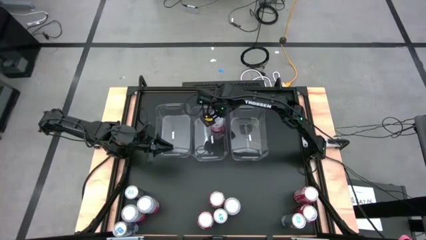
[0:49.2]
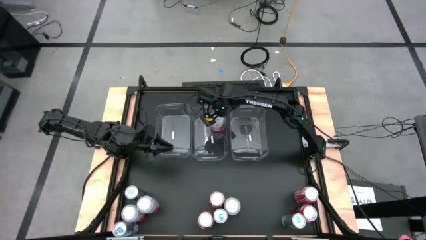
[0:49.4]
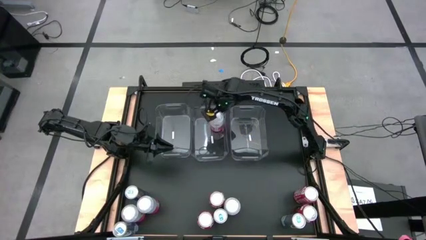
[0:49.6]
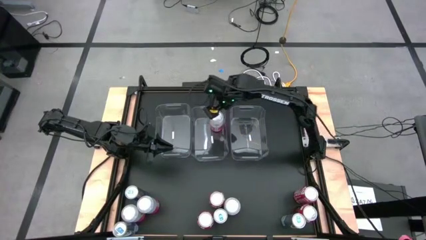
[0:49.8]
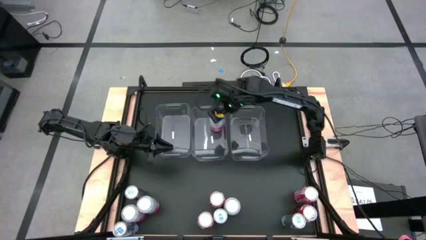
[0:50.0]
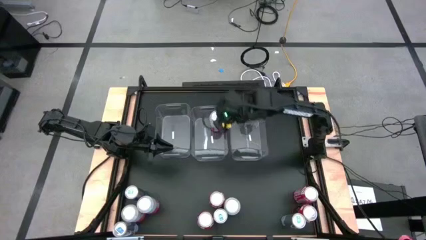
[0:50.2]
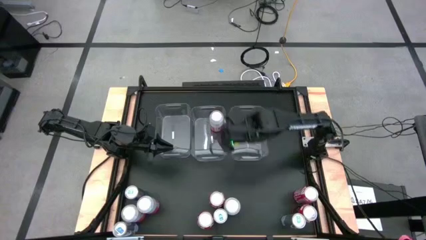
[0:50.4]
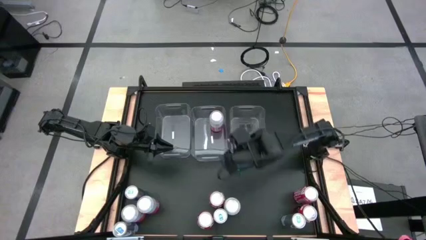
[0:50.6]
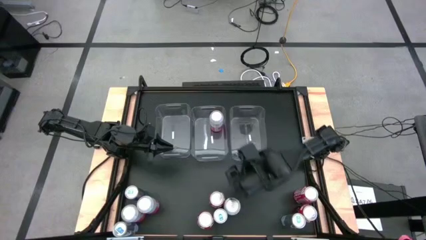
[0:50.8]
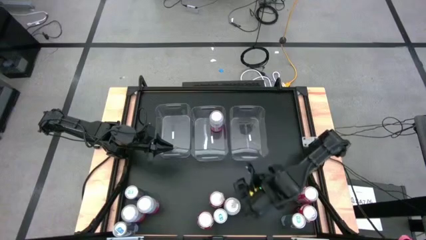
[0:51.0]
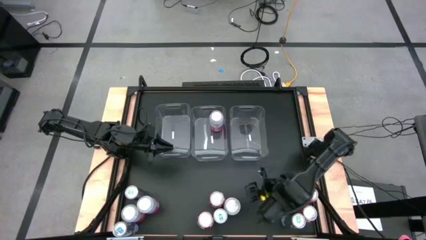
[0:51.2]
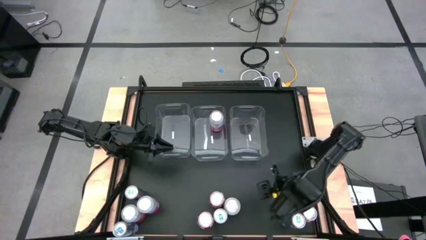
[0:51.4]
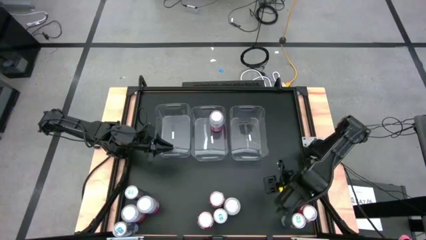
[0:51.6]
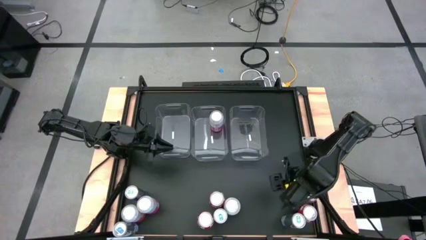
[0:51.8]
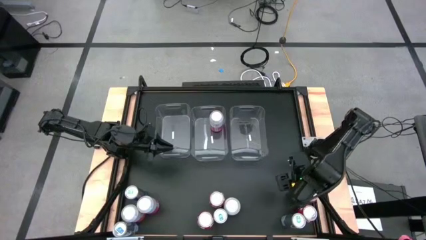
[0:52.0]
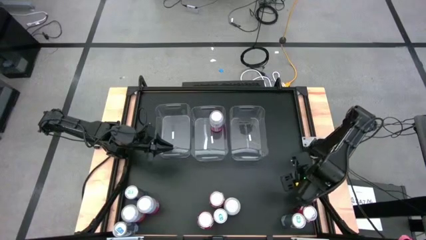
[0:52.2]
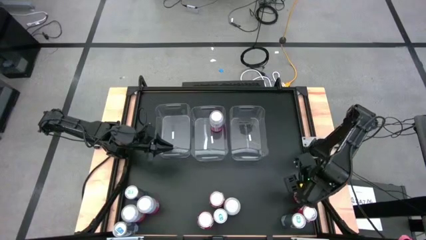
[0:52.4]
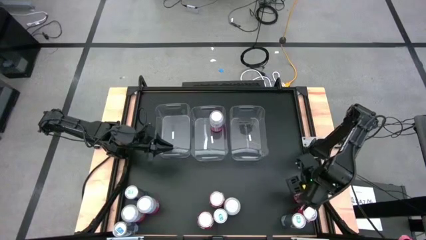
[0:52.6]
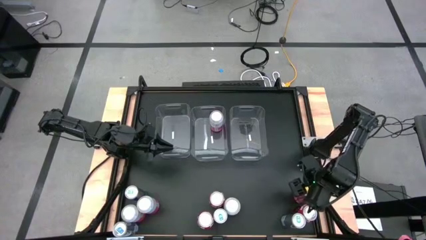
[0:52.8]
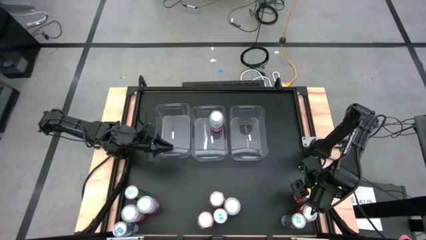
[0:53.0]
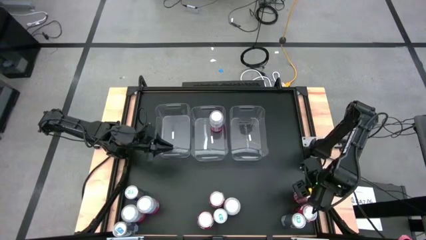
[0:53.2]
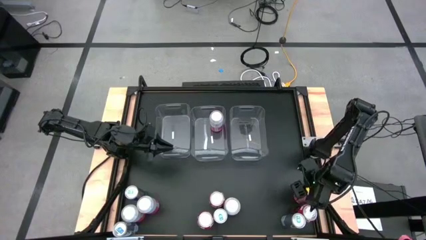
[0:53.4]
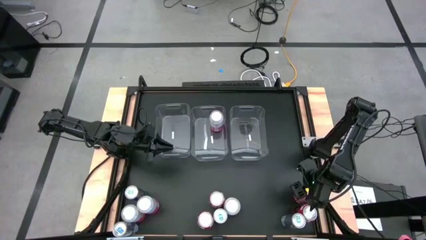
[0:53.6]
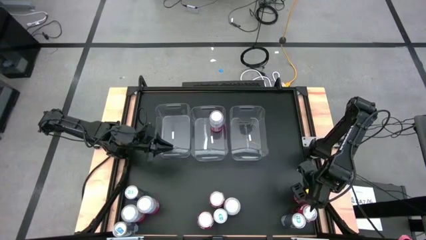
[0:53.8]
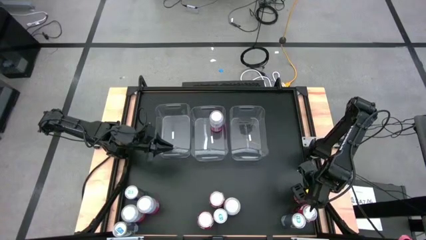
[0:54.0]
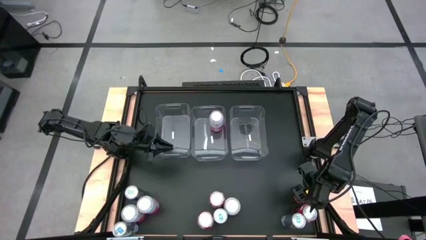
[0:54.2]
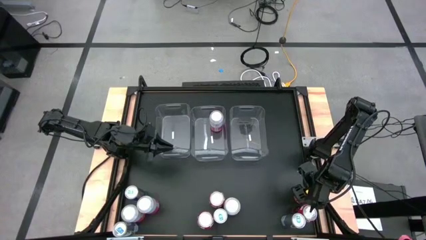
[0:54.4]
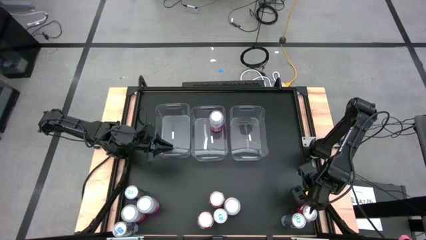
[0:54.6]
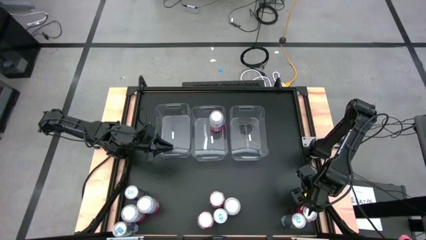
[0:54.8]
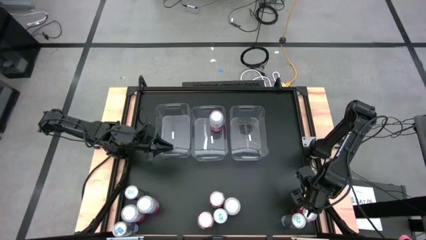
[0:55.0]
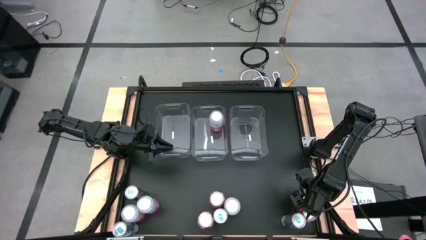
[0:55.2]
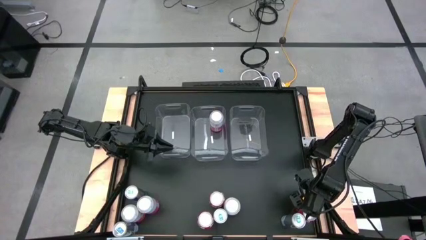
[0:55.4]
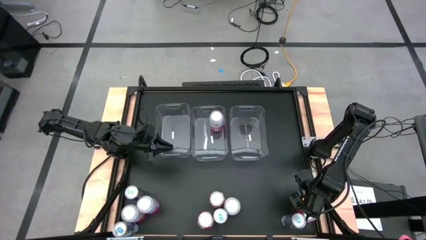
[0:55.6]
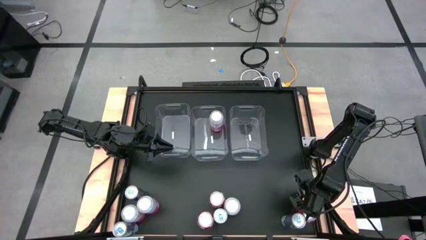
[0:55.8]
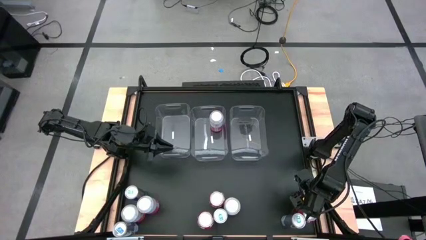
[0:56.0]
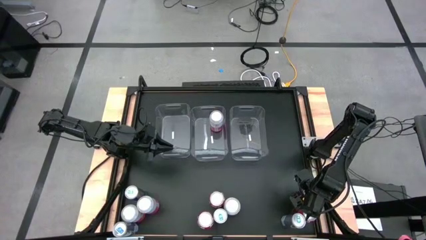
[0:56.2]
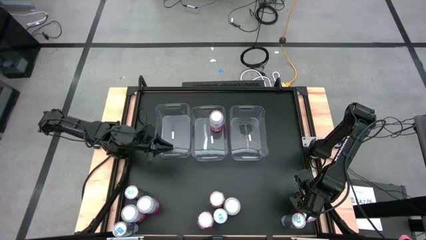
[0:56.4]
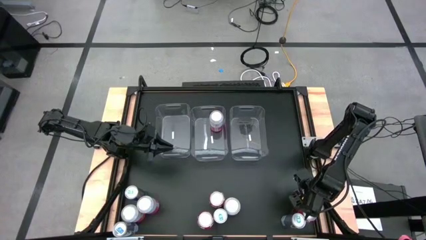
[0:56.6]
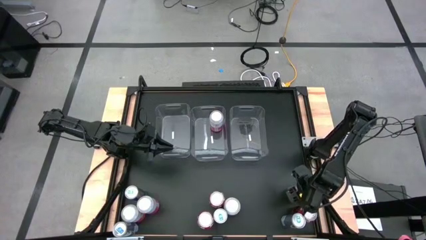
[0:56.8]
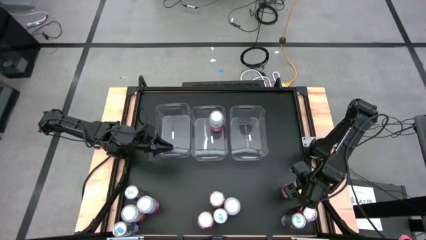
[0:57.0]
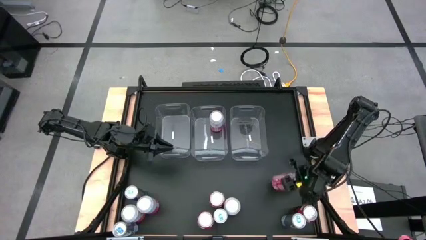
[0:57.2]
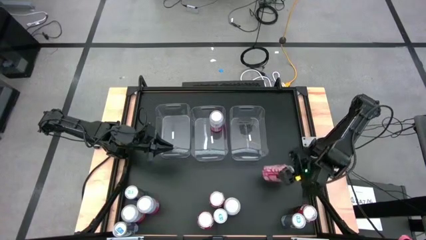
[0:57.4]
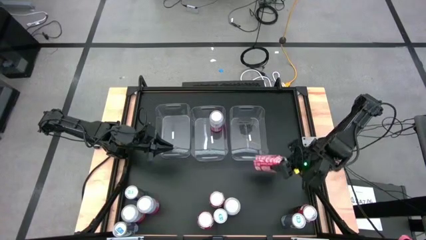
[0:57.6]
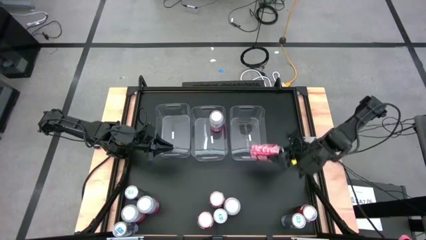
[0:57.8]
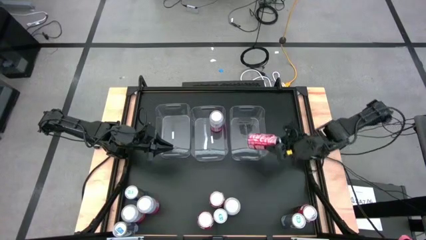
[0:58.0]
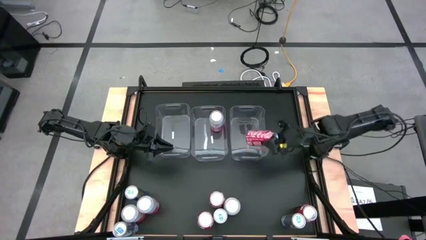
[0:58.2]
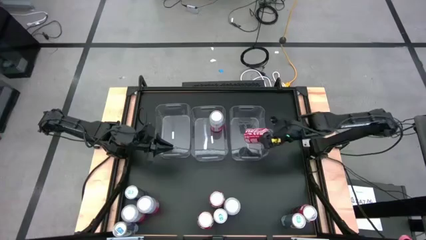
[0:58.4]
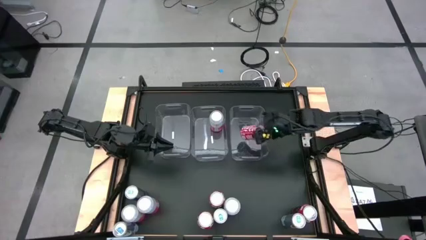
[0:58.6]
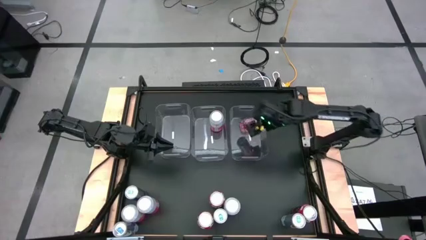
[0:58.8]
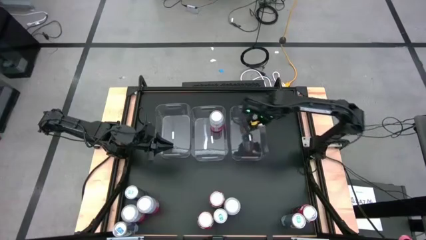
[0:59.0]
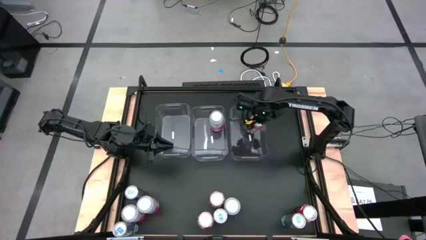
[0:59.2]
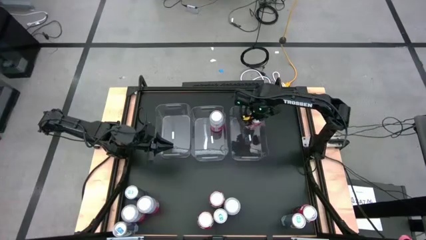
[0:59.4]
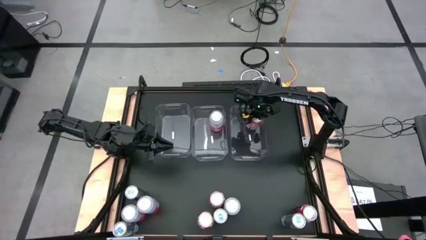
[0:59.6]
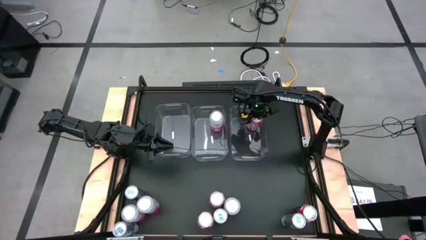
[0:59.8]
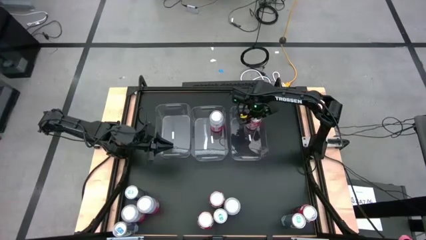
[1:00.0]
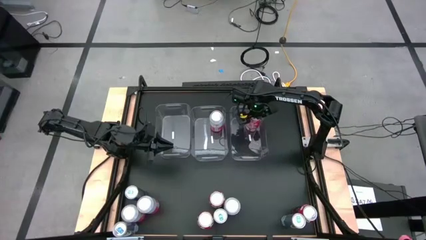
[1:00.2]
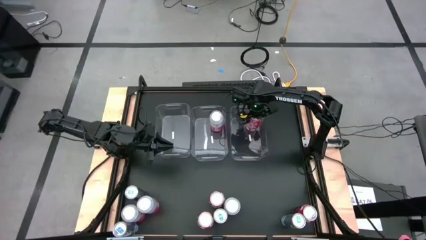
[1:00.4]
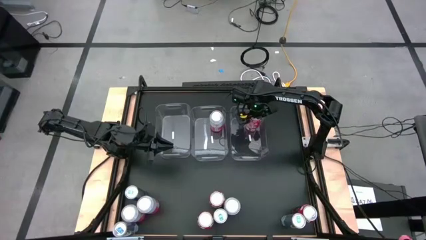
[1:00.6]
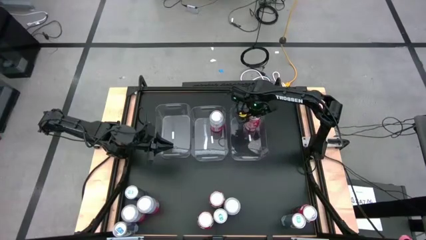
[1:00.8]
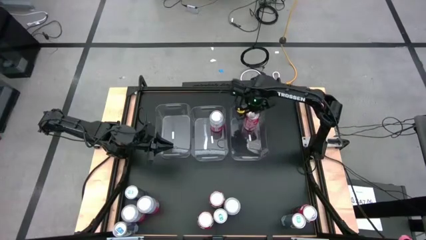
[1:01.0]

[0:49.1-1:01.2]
Task: Sort soda cans
Put the red-white soda can into the right transparent bin

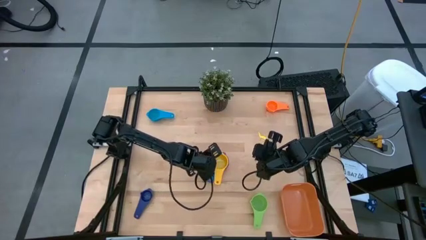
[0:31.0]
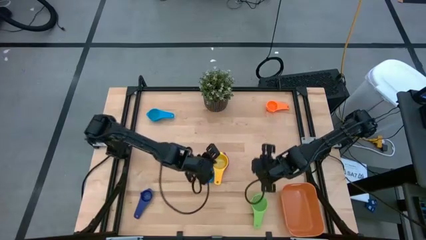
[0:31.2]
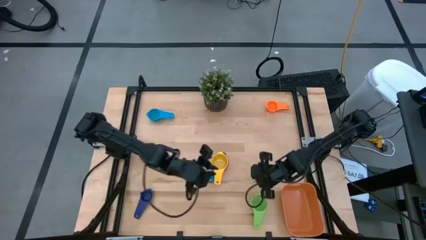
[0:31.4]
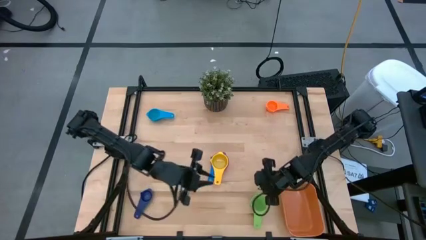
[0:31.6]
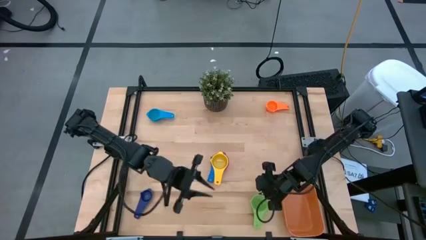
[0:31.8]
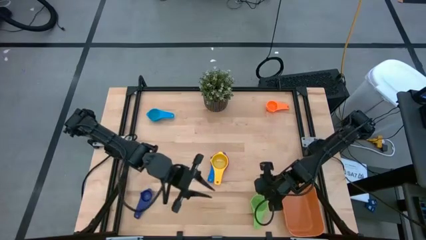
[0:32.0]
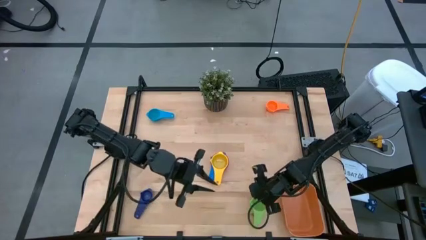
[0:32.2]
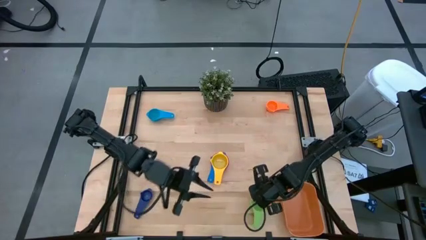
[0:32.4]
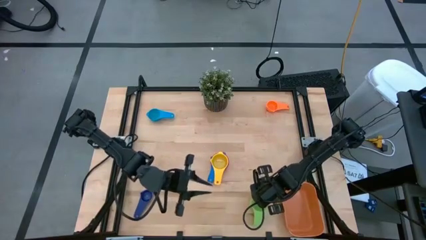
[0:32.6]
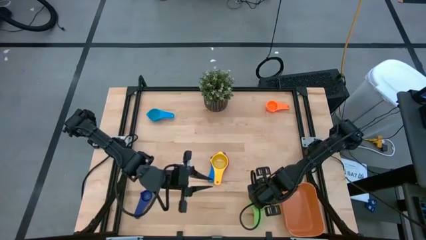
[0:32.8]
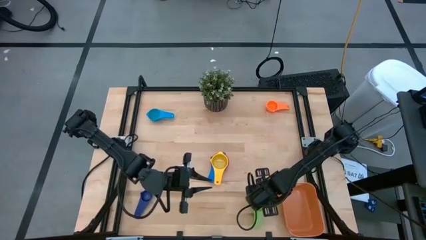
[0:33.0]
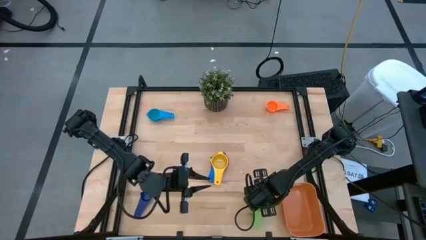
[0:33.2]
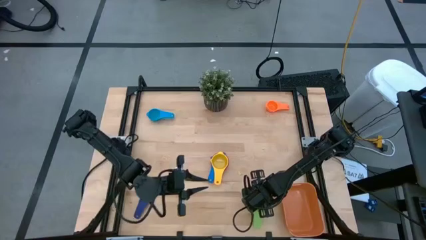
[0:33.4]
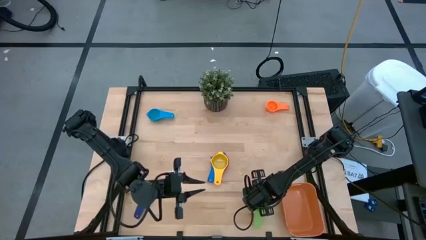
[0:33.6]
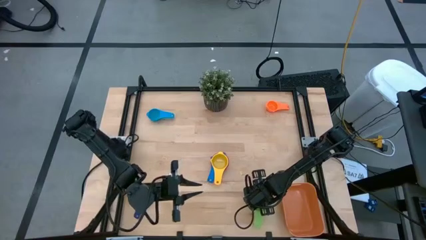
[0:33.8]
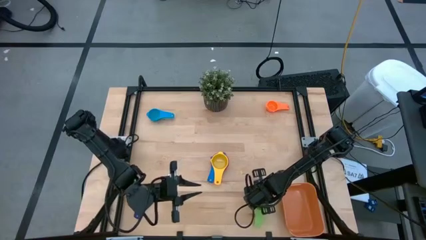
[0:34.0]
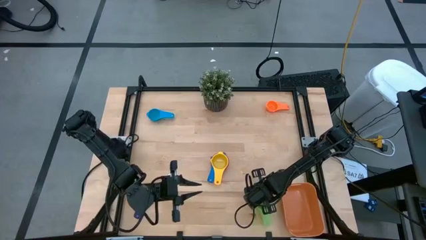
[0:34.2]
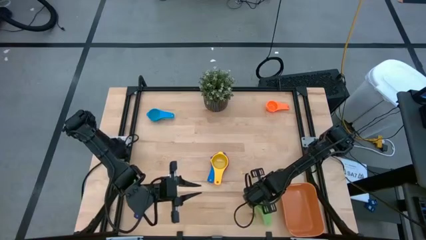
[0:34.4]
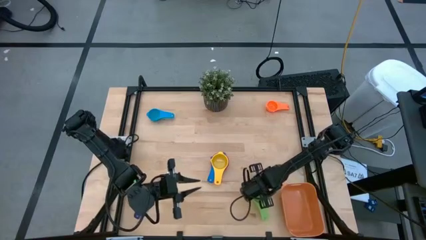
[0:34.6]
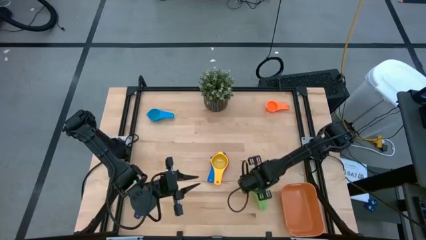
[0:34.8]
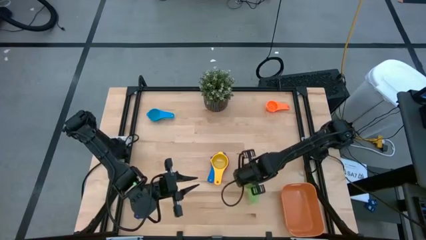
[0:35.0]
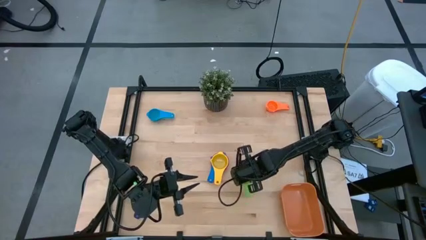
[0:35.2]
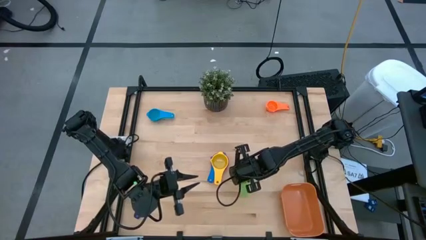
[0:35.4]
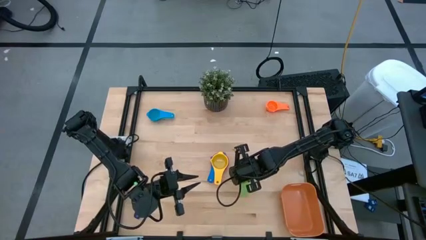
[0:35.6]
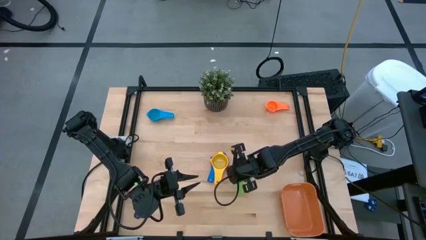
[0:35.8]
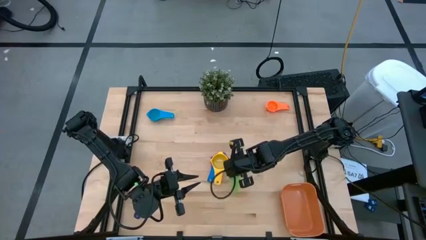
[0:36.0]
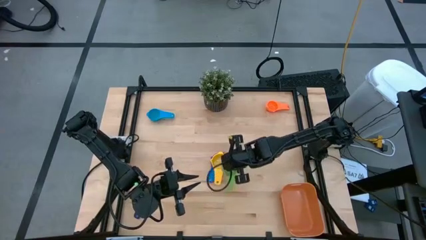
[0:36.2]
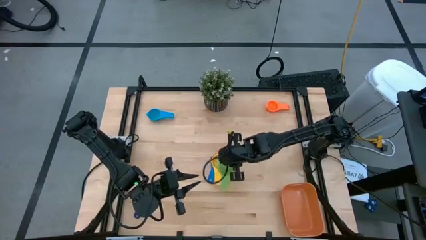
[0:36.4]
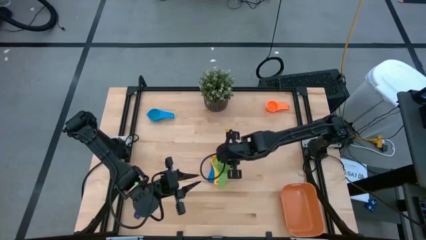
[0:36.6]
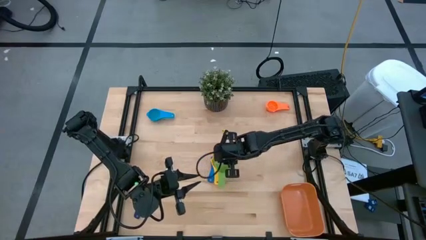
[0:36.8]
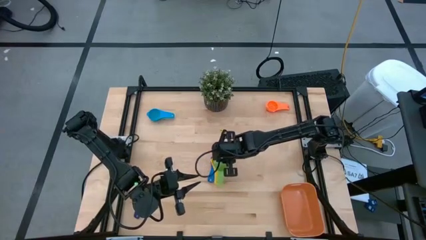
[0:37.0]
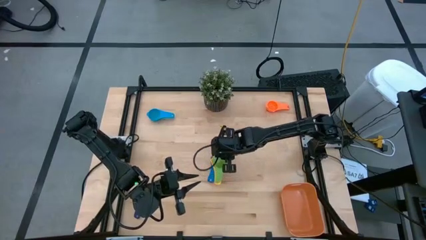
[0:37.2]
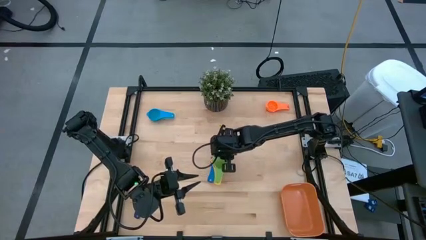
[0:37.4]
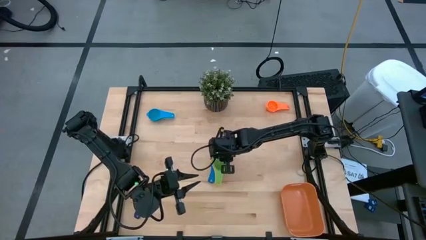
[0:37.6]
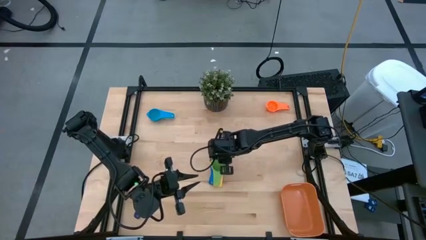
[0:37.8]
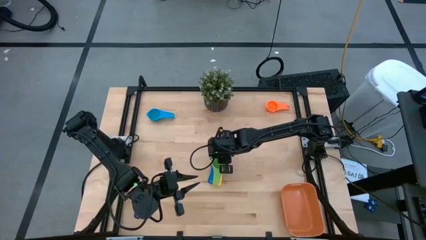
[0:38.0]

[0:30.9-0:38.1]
Task: Nest measuring cups in basket
Stack the green measuring cup on top of the yellow measuring cup
